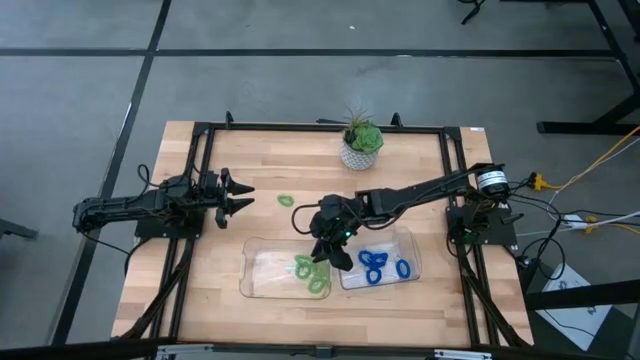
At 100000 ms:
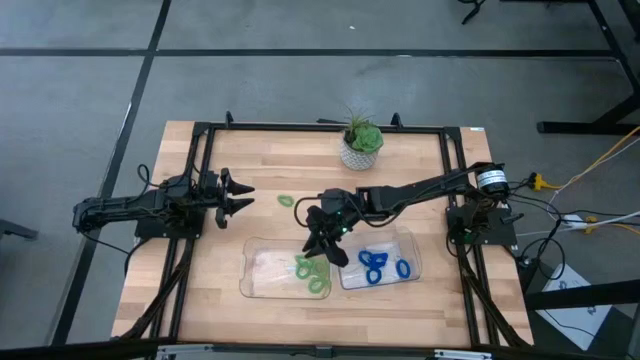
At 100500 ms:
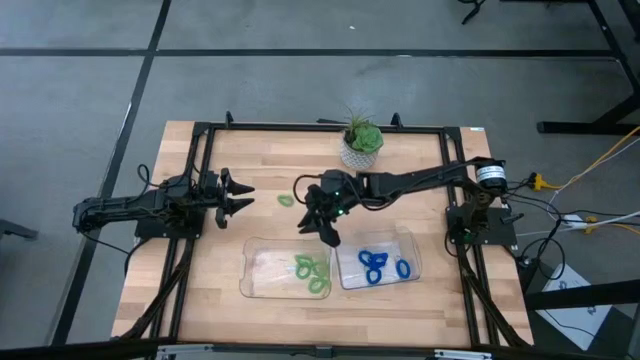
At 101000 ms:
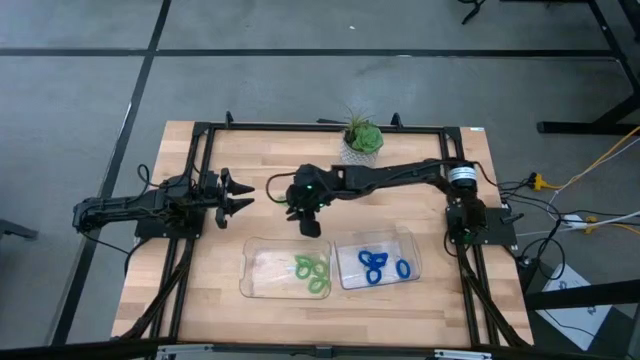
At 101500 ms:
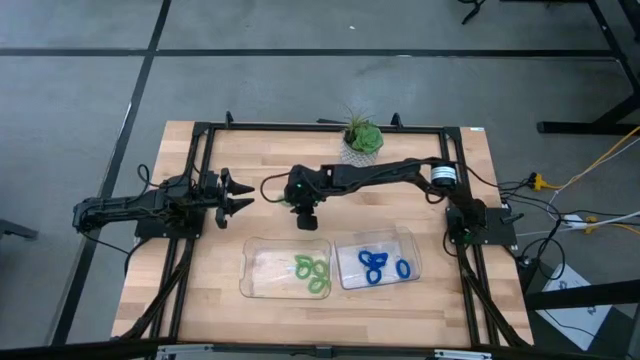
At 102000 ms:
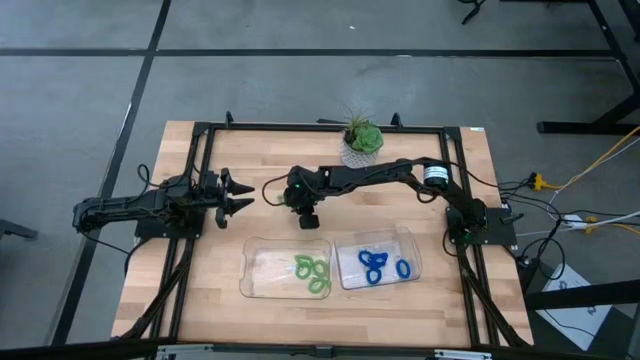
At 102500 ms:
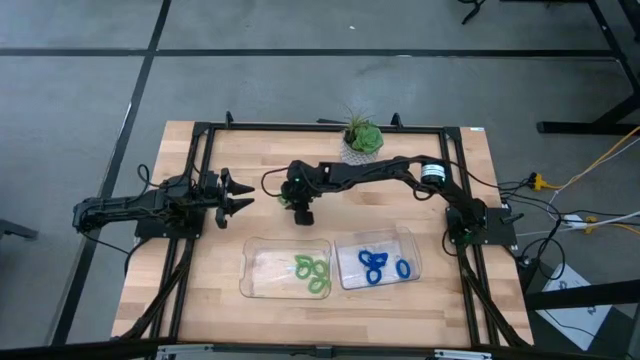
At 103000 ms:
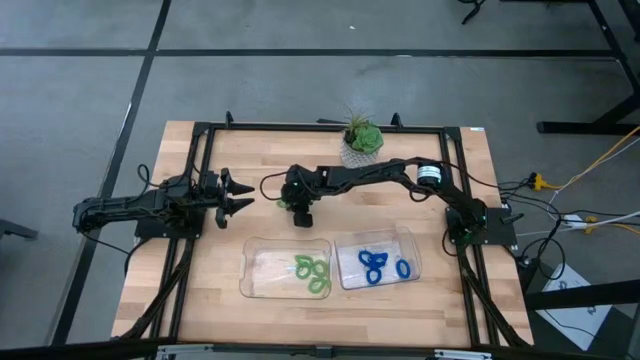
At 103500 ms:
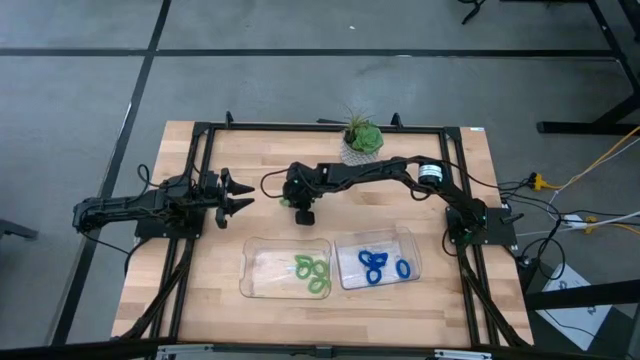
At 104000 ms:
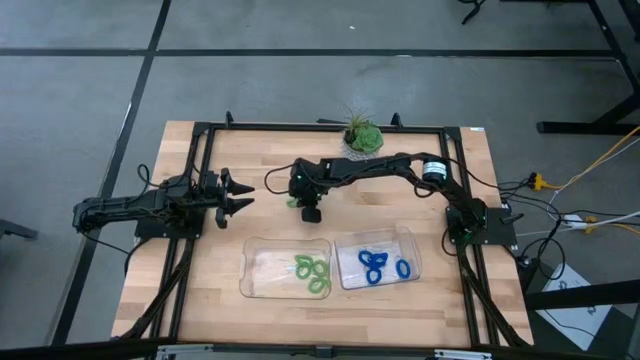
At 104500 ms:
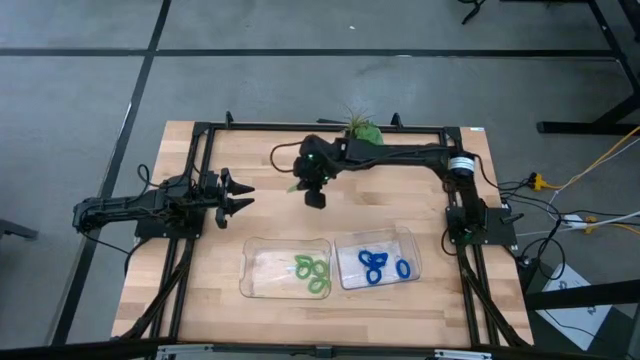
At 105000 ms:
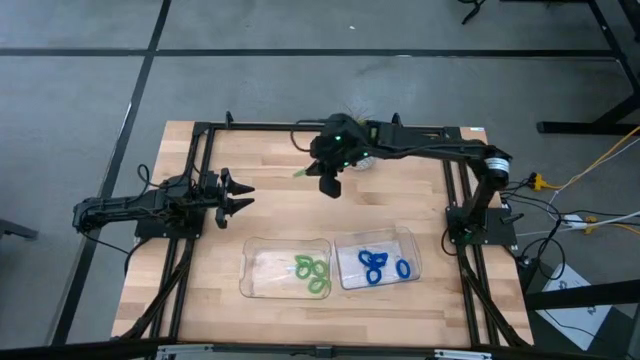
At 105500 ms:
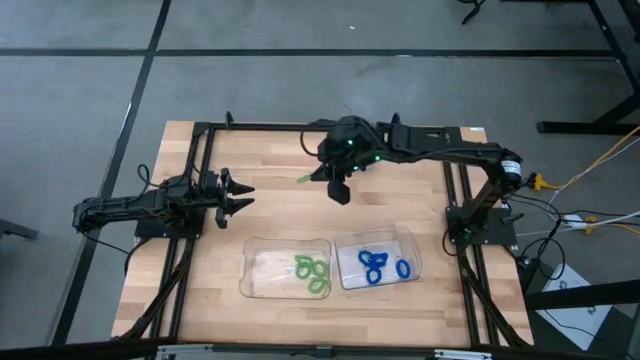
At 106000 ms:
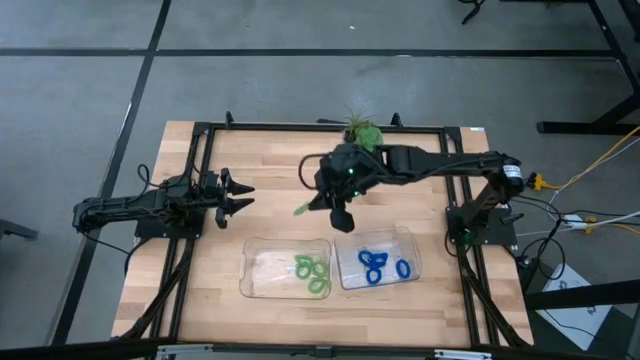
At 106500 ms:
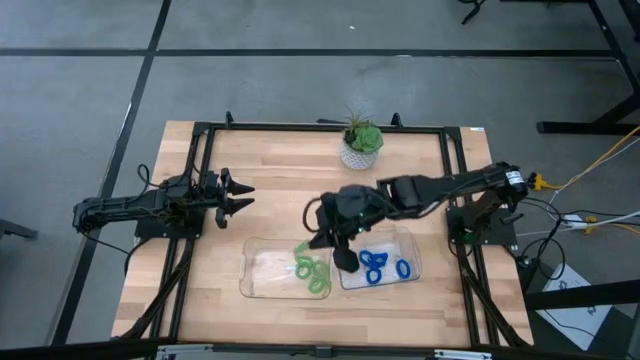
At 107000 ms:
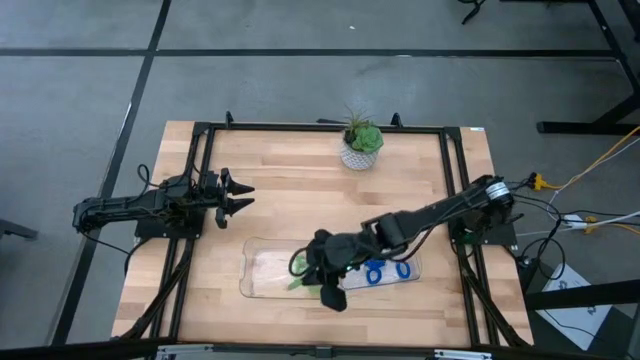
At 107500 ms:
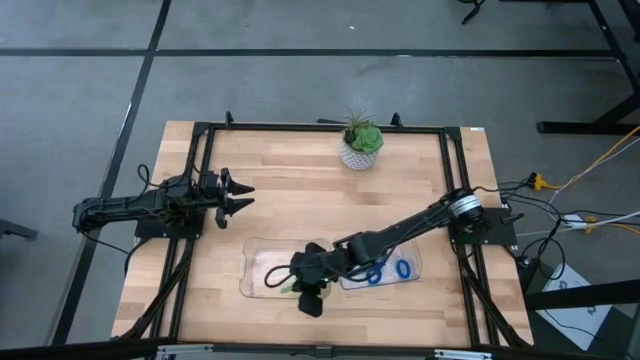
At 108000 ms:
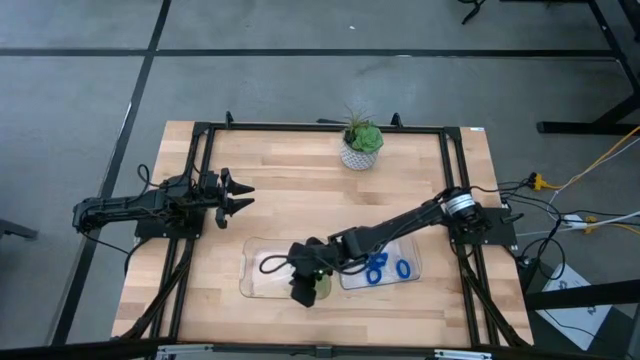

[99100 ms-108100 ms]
Task: Sort spring keychains
Put the green spring keychain into the left transparent bin

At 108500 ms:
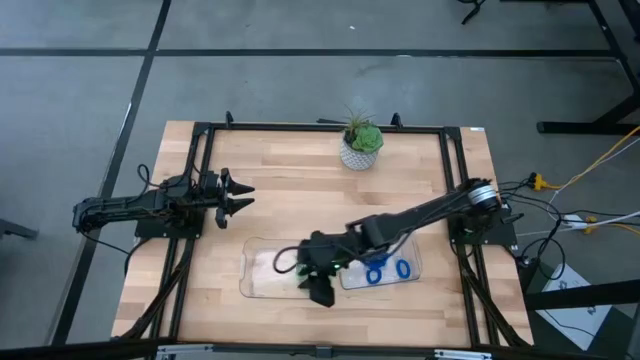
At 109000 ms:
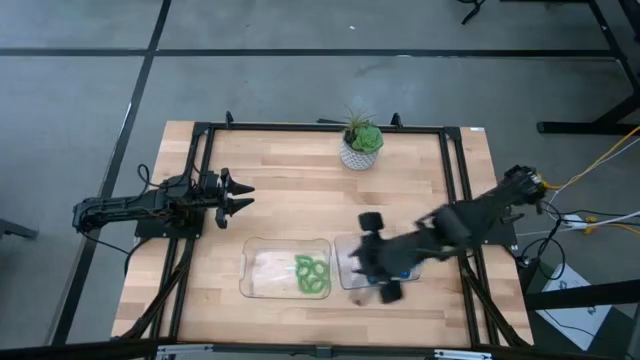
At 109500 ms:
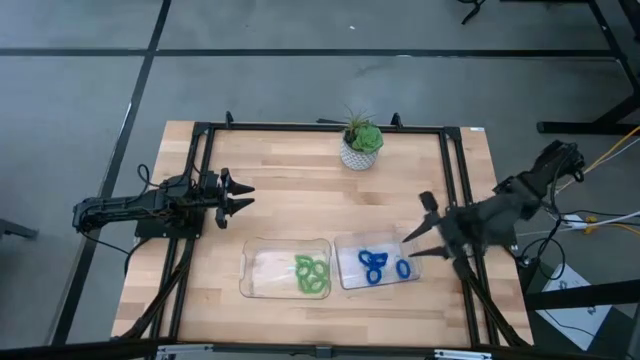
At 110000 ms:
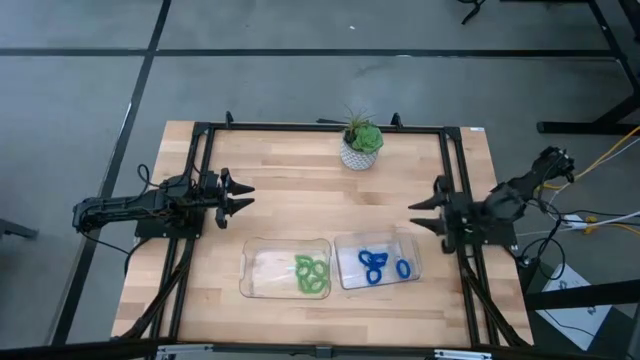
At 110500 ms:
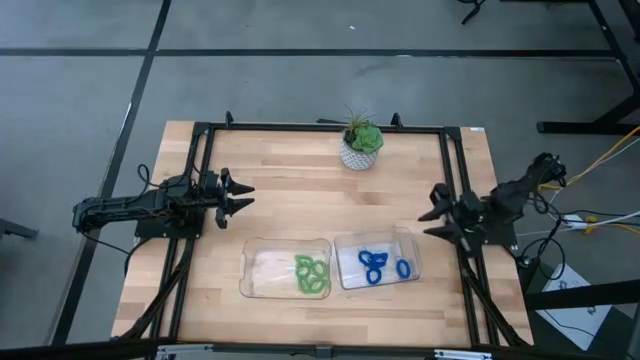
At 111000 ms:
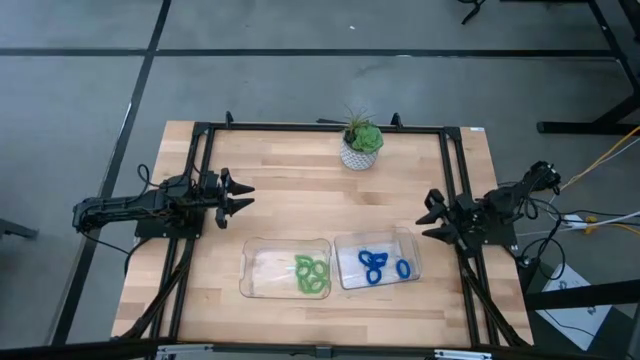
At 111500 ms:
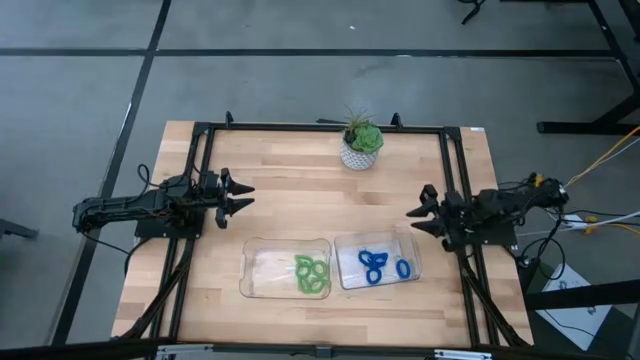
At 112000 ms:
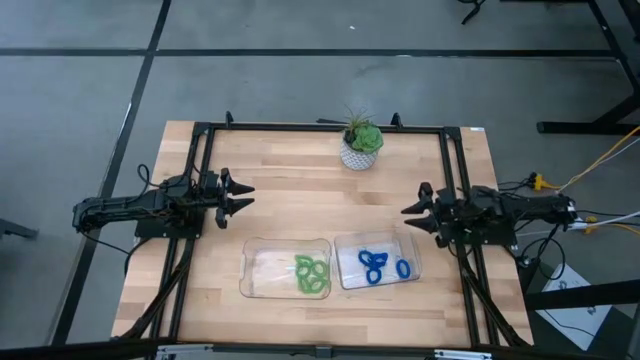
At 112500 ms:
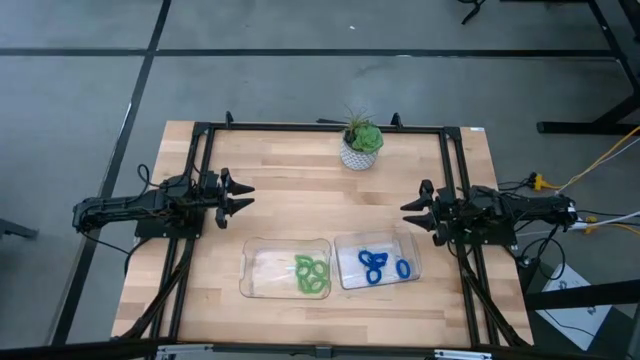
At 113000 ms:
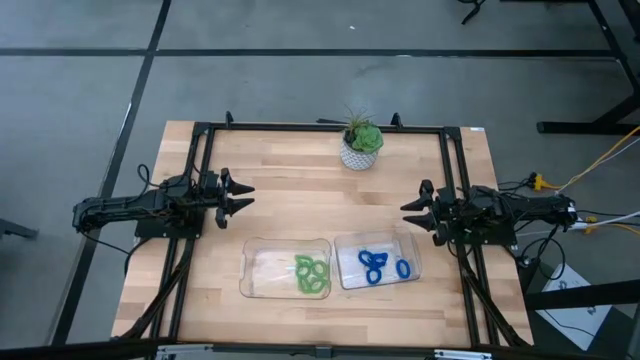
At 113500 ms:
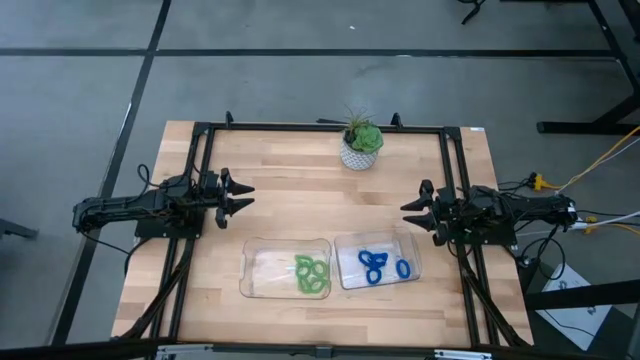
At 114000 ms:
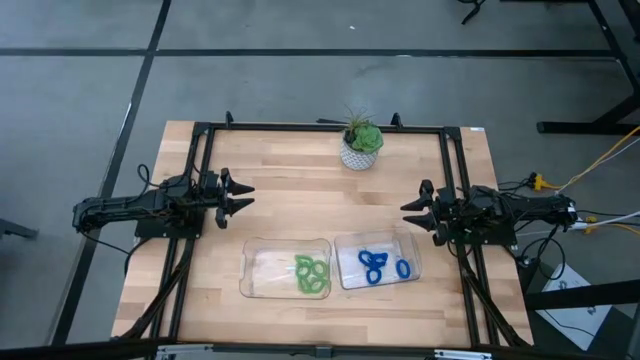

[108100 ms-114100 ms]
Return to Home Position

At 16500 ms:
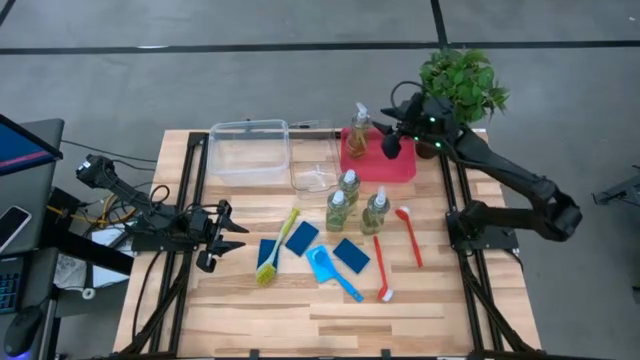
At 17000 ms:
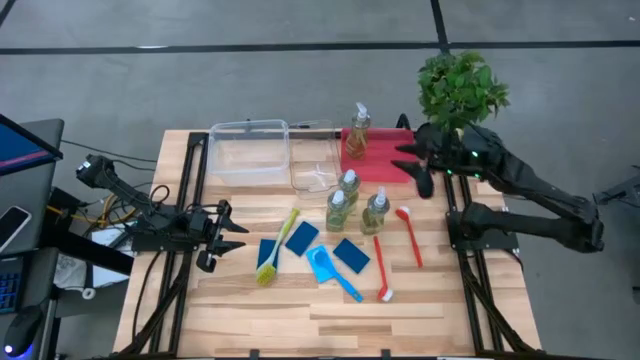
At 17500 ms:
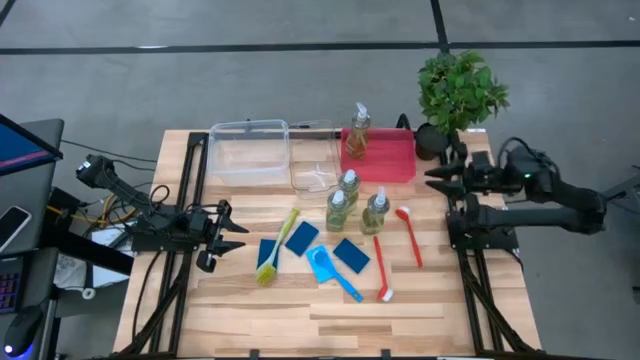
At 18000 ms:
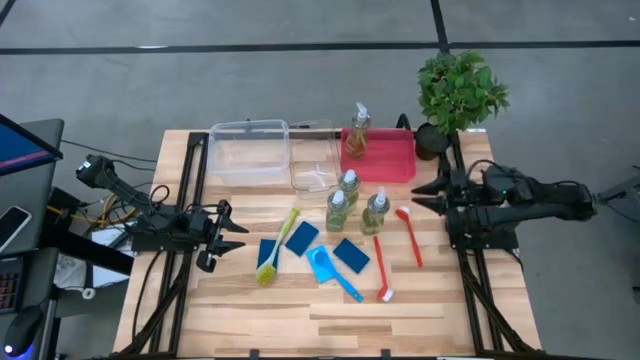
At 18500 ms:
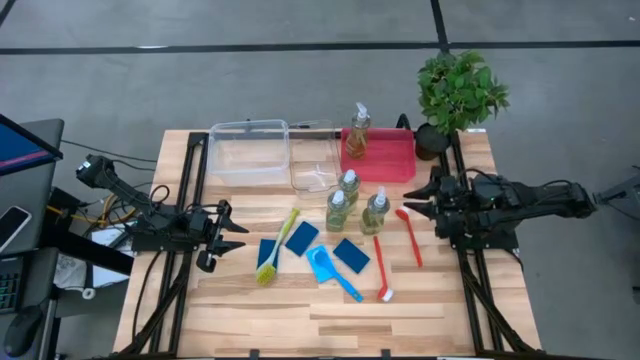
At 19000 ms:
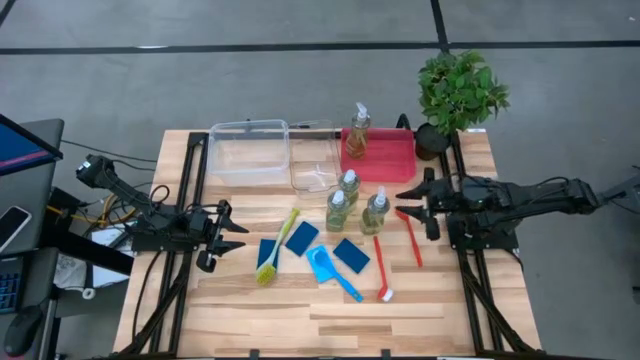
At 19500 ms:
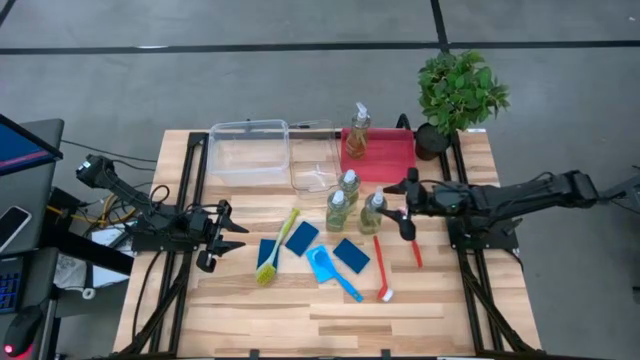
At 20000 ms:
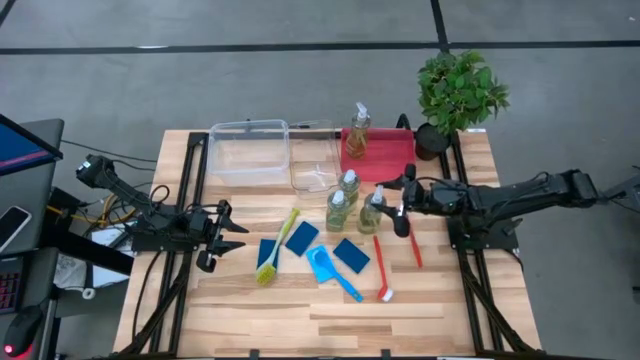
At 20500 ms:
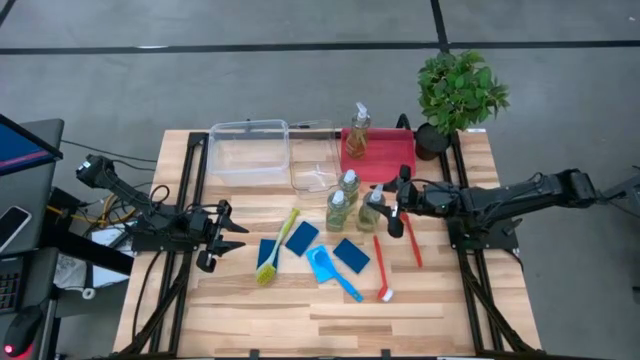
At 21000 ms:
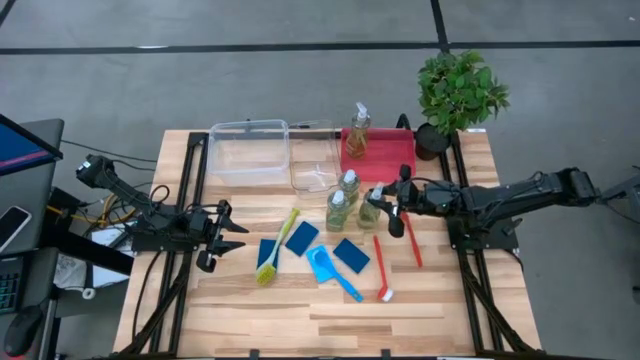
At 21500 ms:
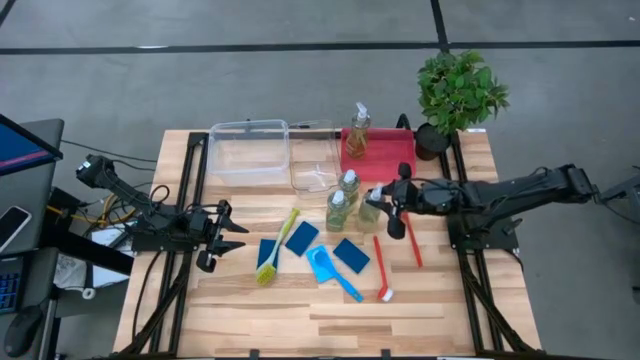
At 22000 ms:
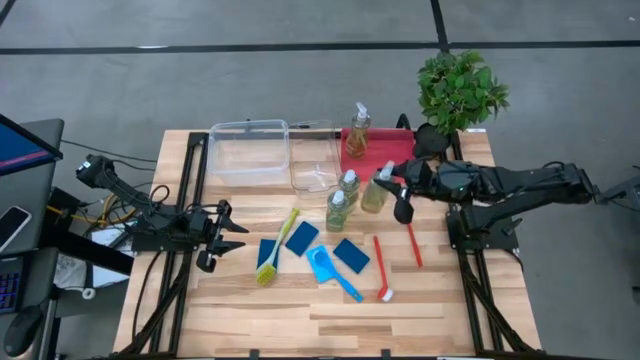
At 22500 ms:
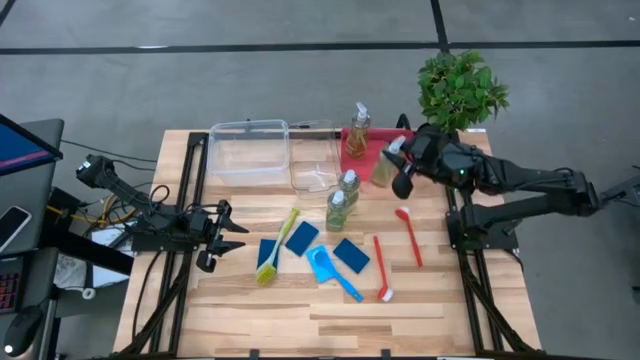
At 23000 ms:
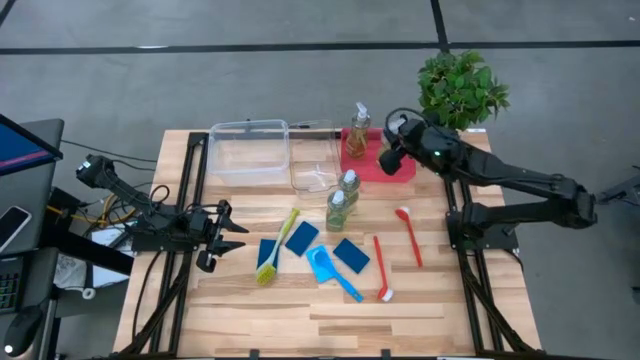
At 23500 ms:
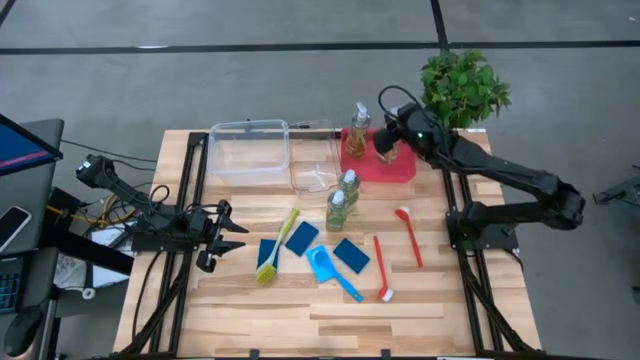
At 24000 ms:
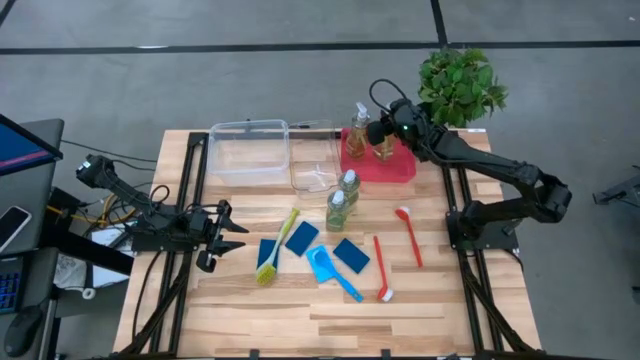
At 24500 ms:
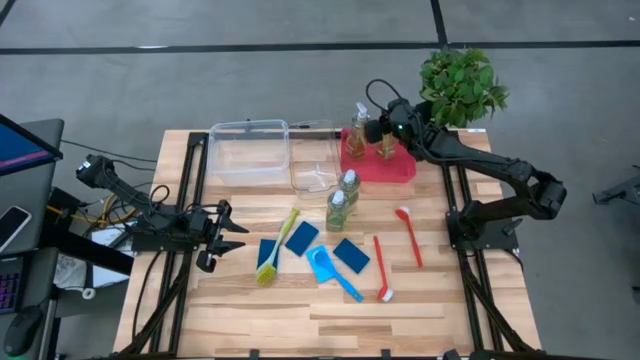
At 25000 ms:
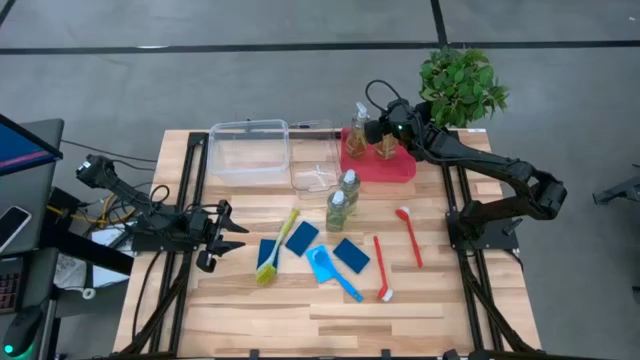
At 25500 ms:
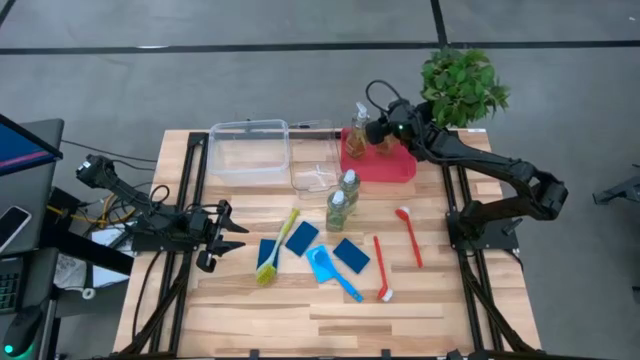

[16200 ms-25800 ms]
Task: Pick & Place Kitchen Sink Supplies
Put the soap dispenser into the red bin
